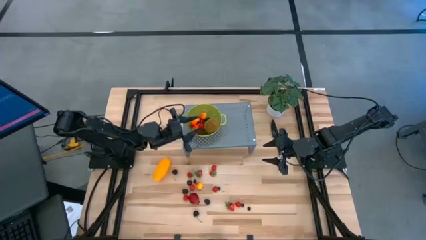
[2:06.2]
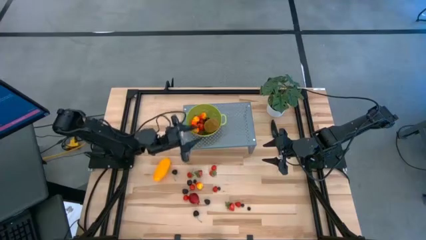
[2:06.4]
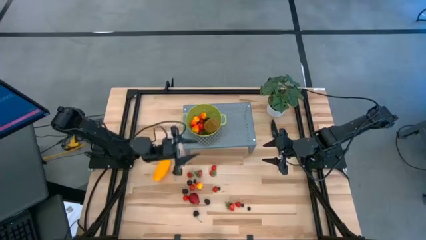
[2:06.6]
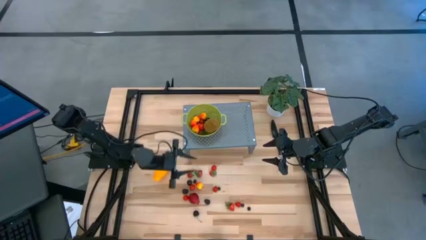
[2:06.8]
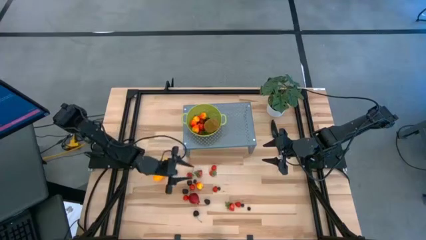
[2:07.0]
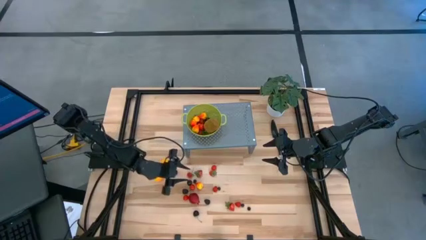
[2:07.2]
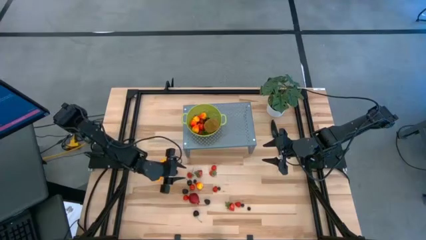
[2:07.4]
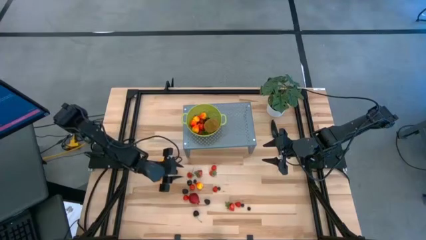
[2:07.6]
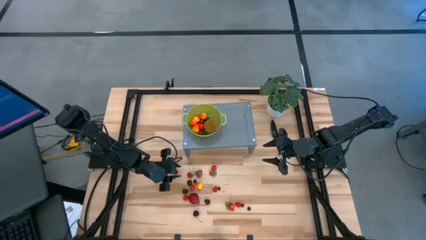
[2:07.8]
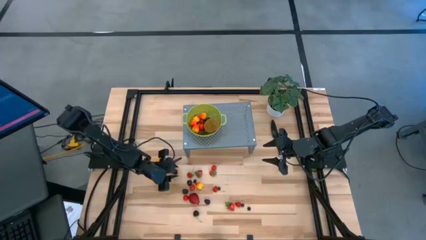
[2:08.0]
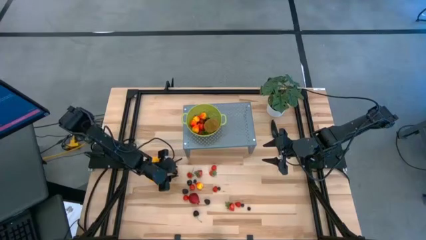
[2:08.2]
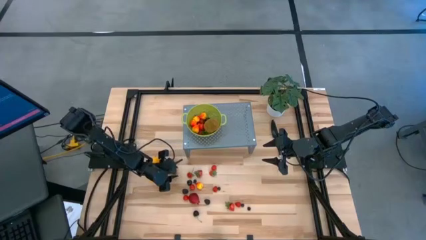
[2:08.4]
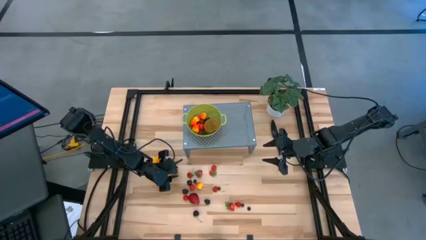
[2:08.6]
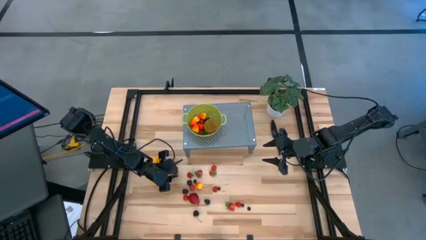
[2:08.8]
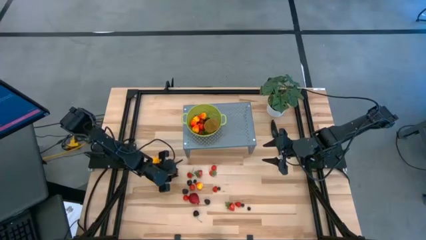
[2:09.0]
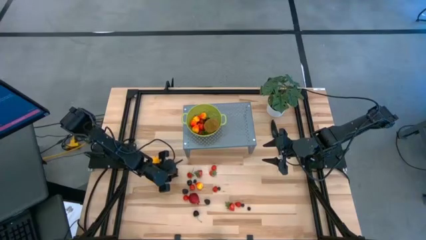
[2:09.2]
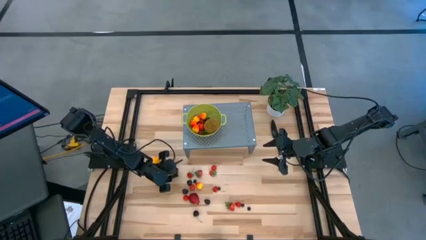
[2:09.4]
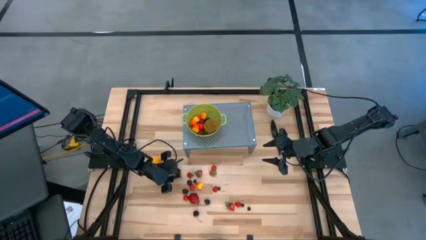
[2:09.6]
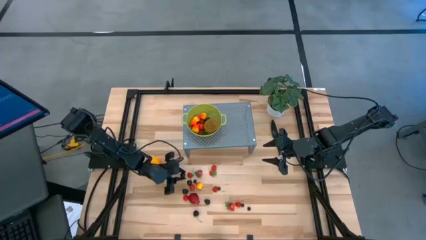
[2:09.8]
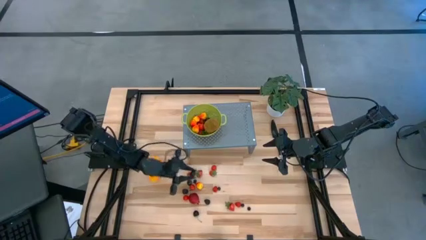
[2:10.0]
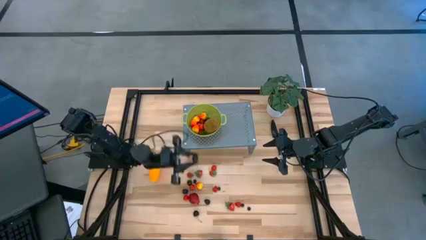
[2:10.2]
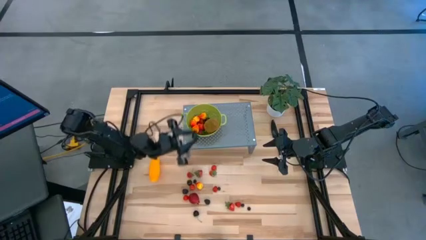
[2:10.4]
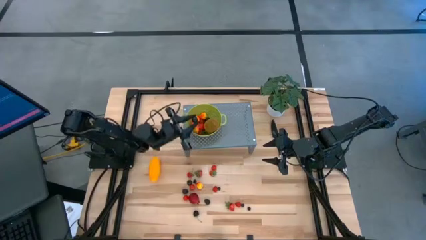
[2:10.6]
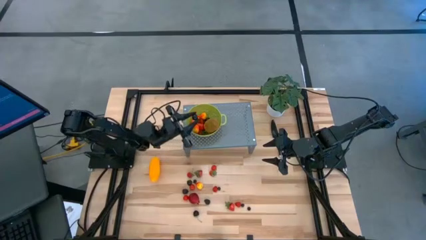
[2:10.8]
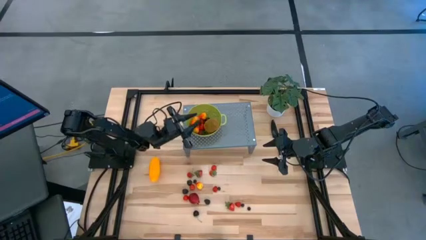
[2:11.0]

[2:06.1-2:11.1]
Task: Pick & Place Fruit
Put the black cherry into the green strainer bowl on the shelf

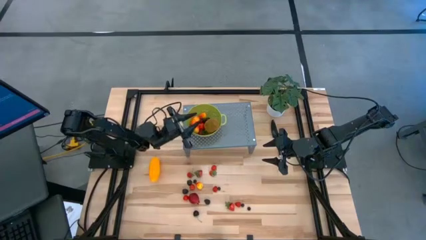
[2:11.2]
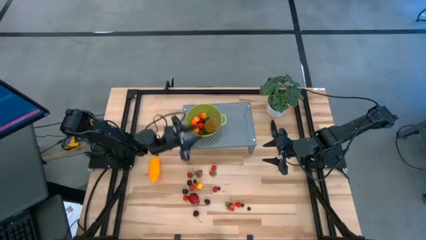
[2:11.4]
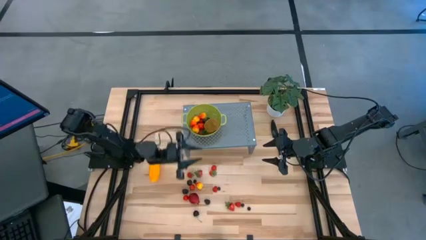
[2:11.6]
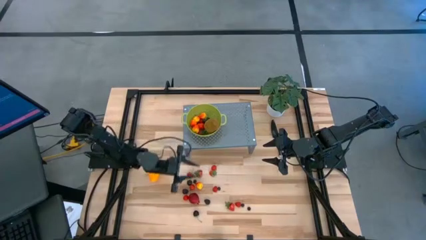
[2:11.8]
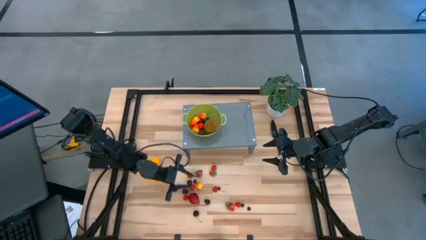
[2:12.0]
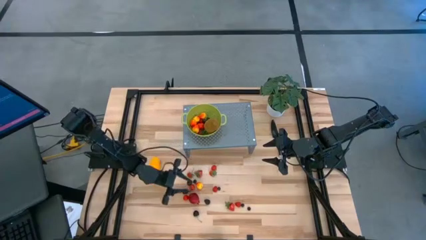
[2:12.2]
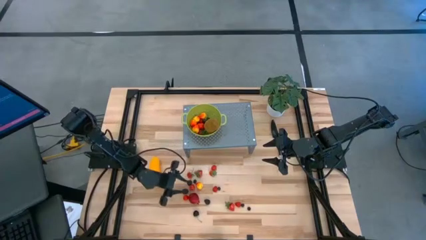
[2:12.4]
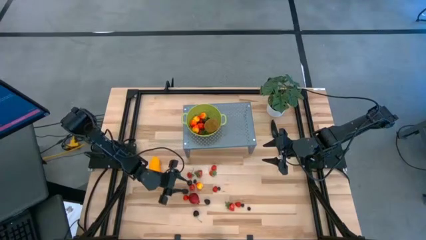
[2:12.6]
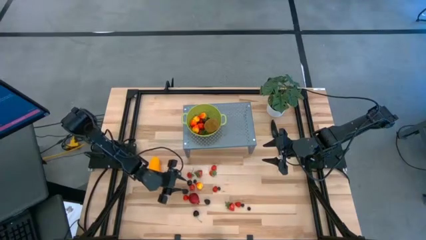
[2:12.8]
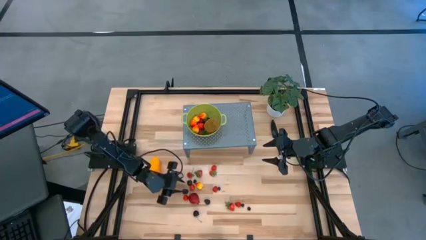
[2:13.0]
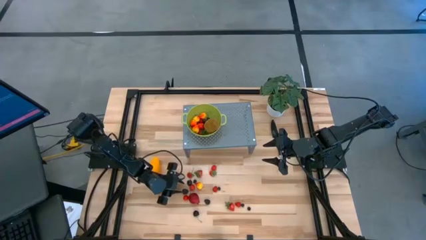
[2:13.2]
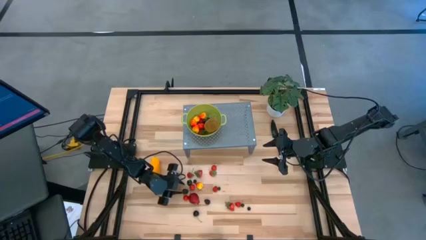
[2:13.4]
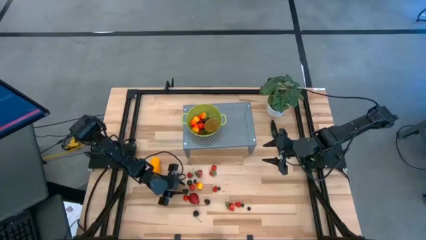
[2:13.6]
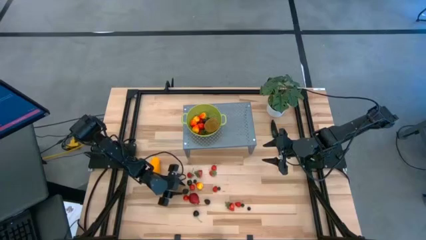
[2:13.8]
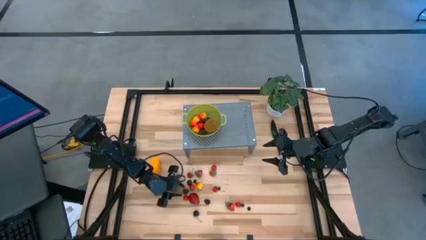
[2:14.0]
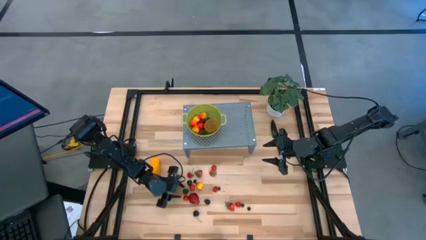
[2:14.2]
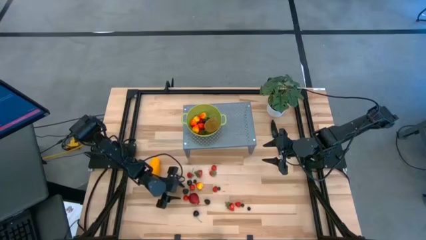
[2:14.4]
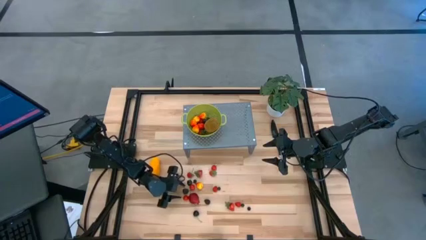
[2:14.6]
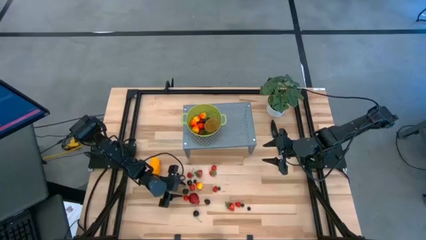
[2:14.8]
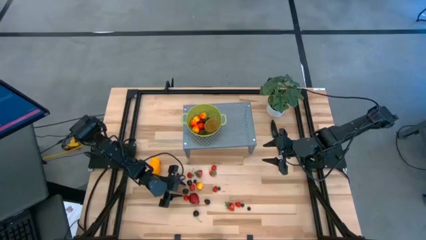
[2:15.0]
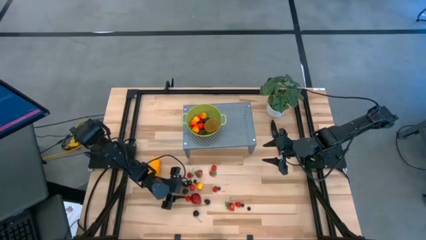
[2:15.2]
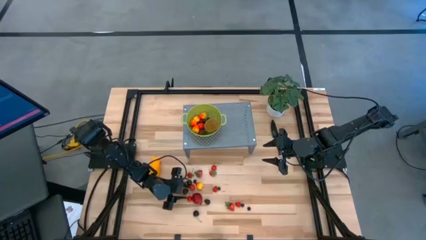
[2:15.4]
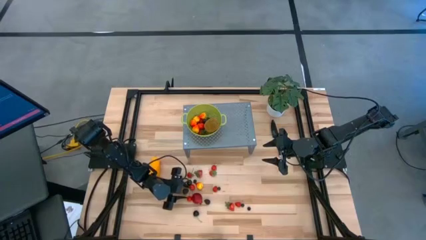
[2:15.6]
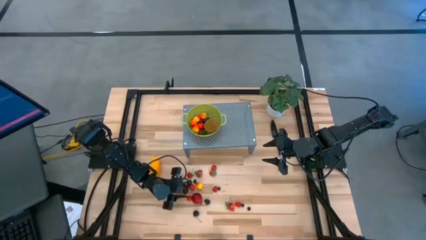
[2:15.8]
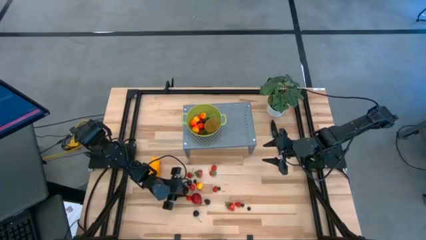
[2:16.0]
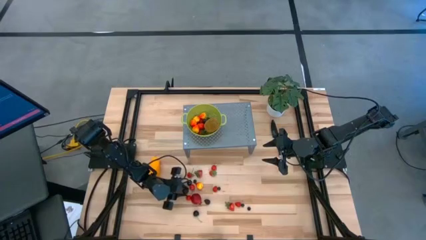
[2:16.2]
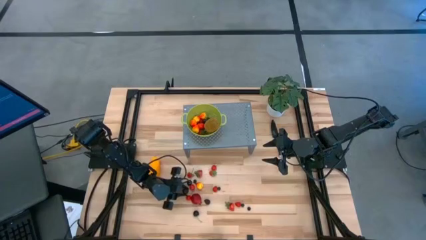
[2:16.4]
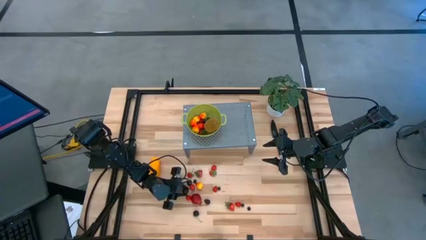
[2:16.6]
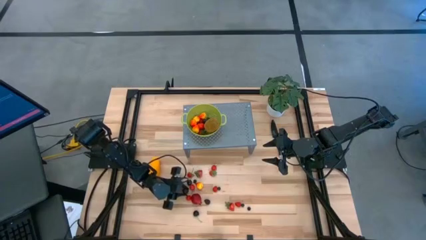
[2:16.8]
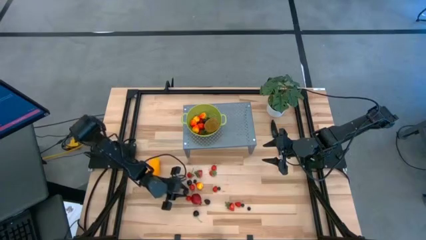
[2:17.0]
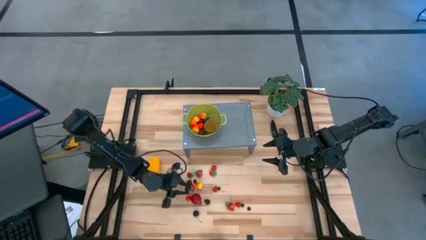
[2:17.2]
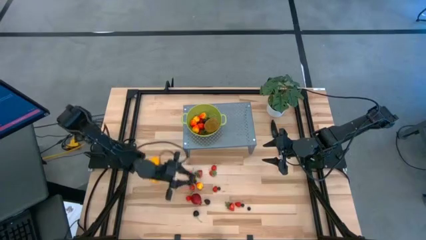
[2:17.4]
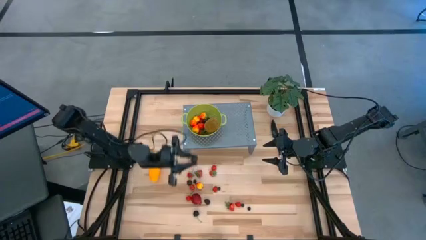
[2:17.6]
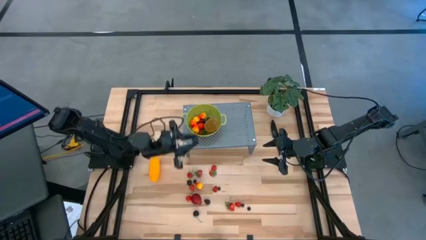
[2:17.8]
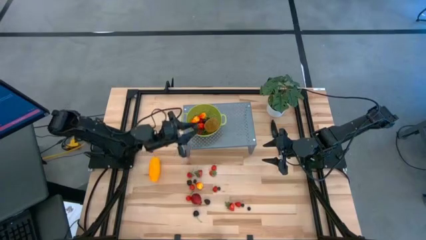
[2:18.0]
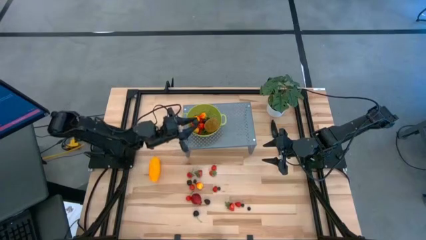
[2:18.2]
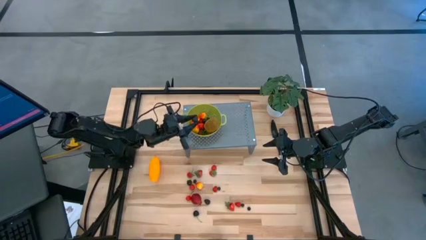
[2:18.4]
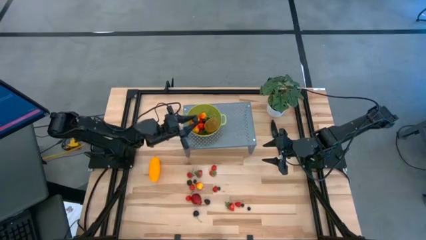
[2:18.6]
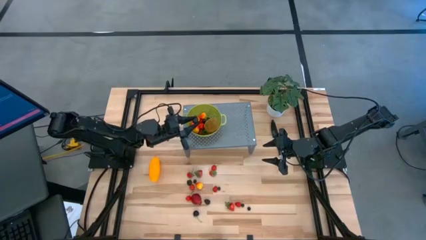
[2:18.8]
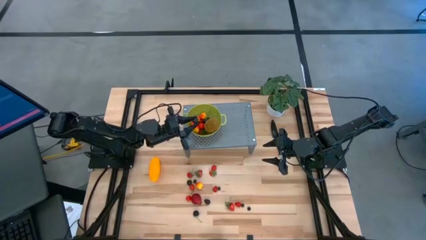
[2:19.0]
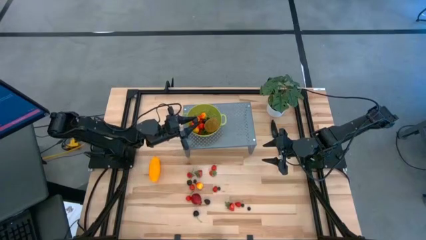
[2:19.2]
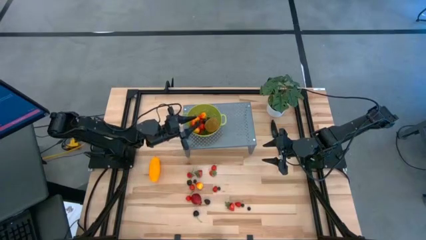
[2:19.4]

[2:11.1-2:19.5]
Put the black raspberry into the green strainer bowl on the shelf

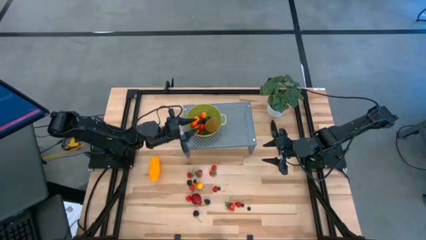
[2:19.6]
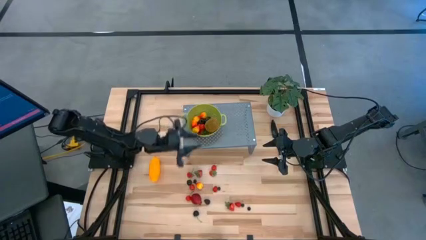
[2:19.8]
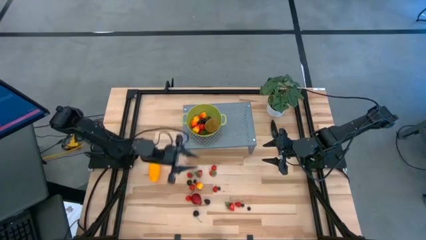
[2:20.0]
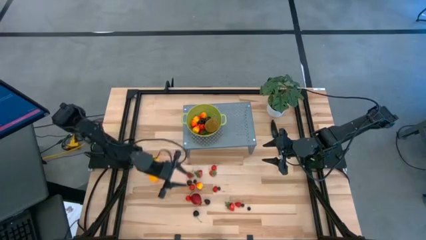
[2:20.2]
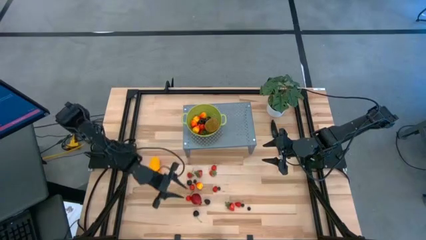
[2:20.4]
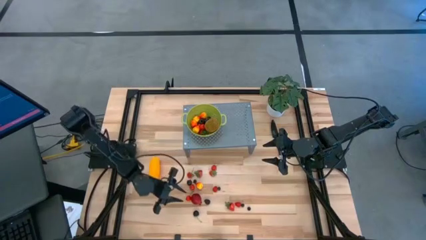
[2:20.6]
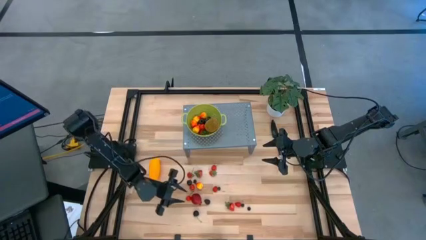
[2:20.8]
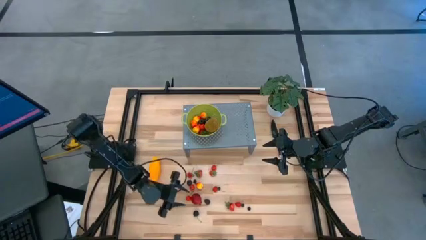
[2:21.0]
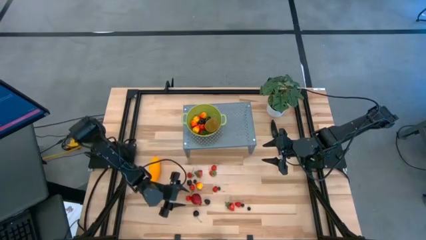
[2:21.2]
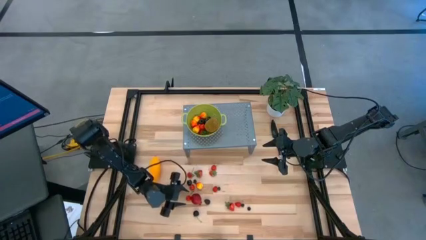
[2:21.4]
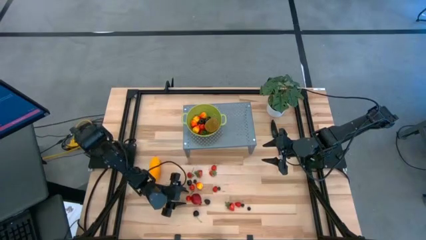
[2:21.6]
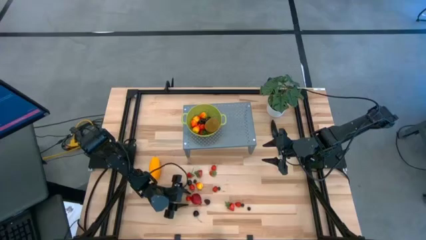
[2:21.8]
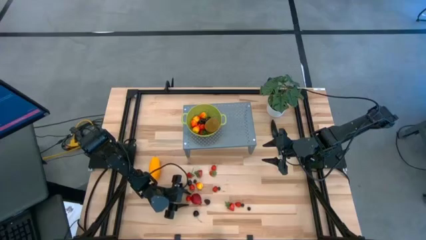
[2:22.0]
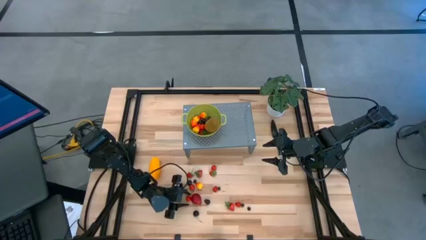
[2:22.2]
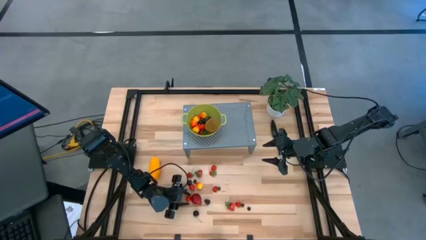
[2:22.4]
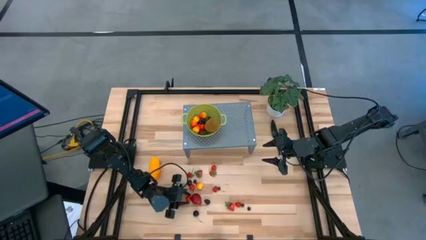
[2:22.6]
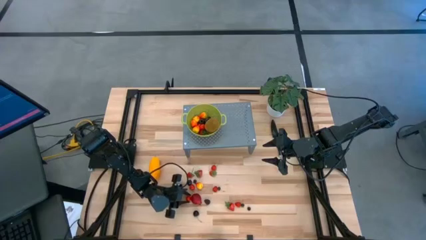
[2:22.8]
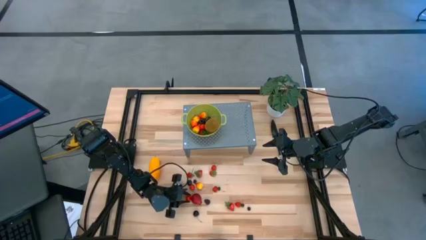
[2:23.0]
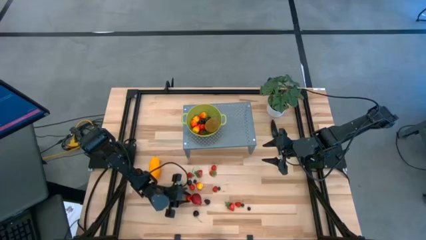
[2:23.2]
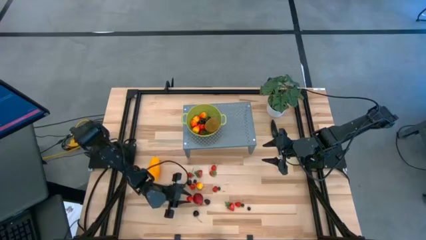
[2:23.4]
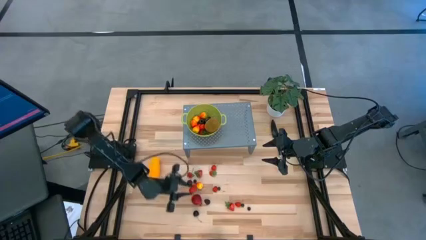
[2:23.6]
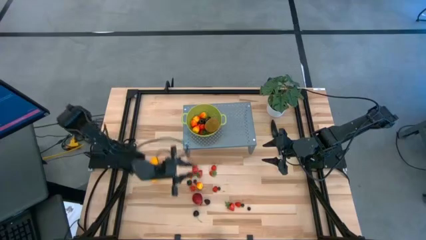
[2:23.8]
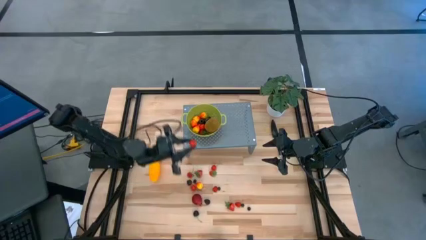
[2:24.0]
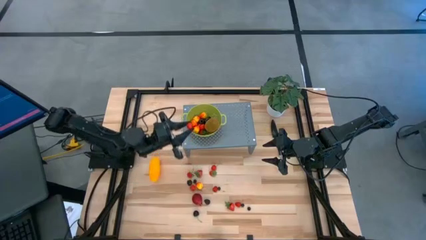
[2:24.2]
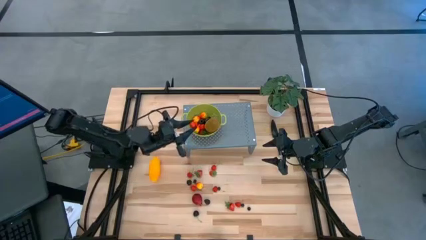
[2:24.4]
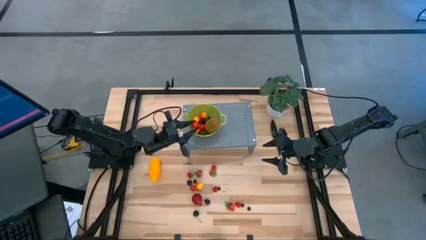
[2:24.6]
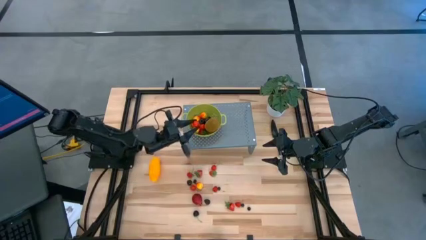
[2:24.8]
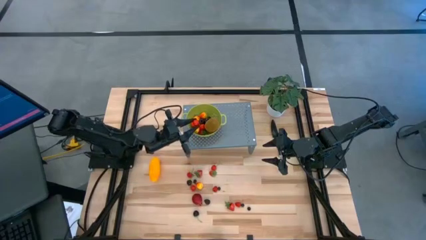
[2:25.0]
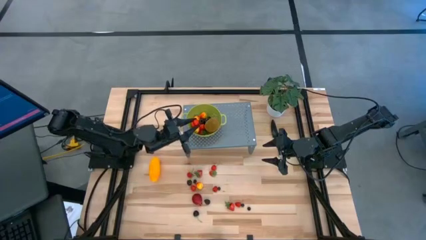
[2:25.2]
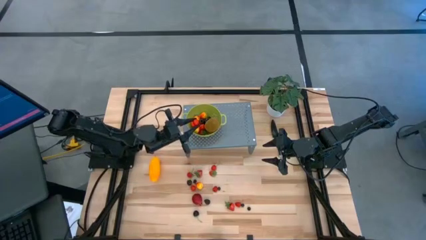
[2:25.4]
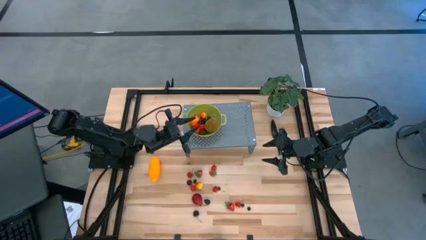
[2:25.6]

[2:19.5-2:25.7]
Put the red cherry into the green strainer bowl on the shelf
